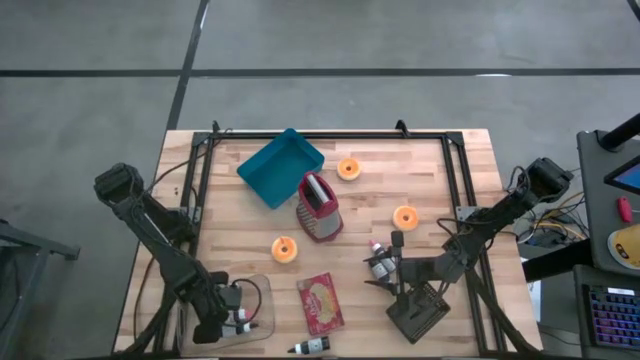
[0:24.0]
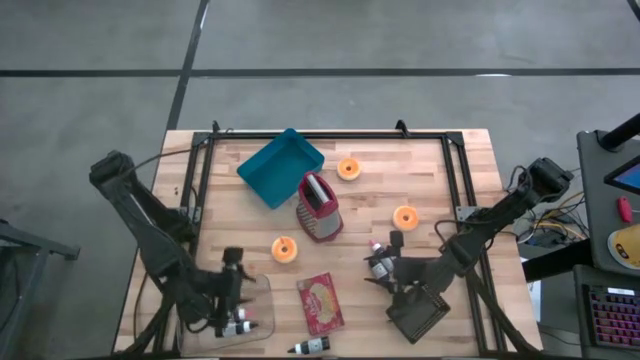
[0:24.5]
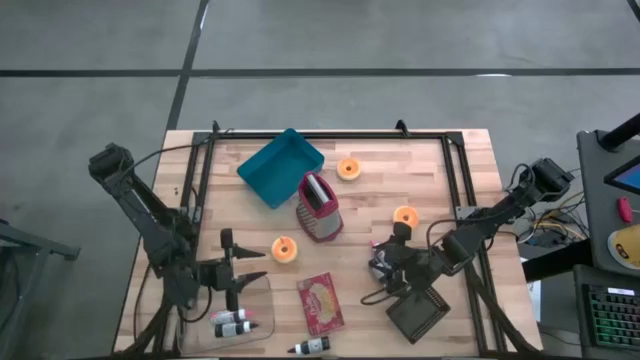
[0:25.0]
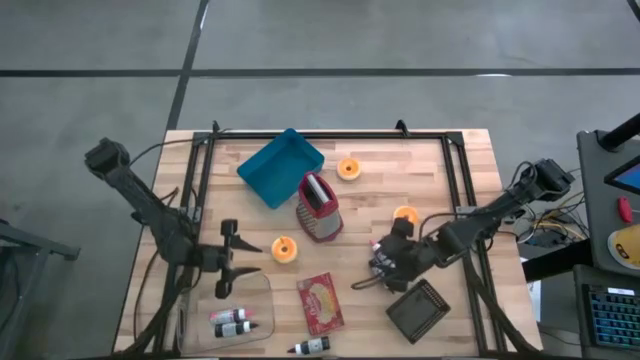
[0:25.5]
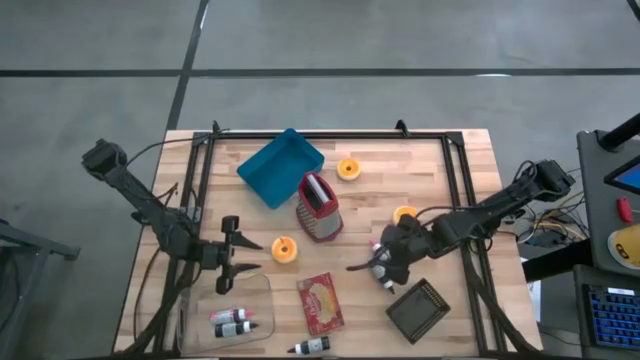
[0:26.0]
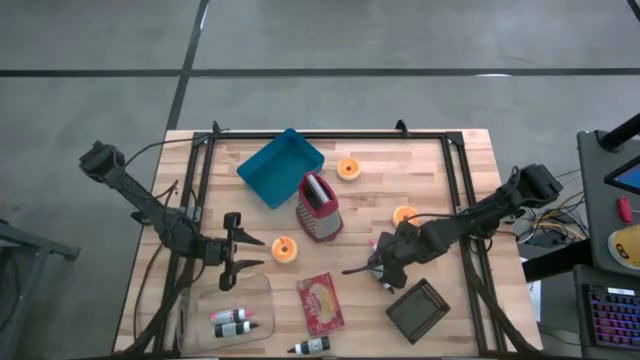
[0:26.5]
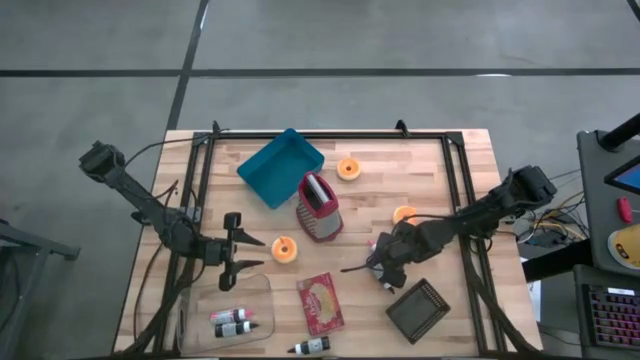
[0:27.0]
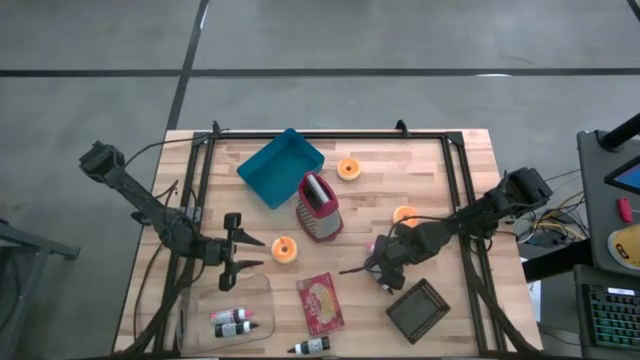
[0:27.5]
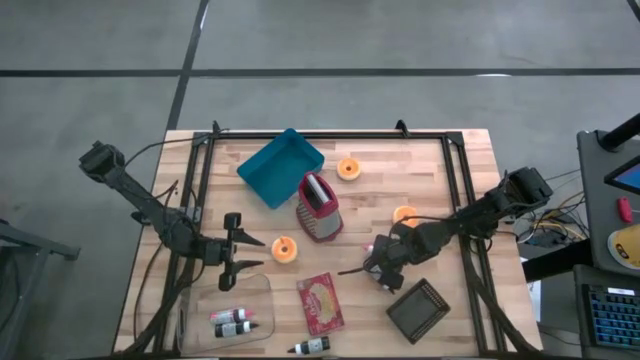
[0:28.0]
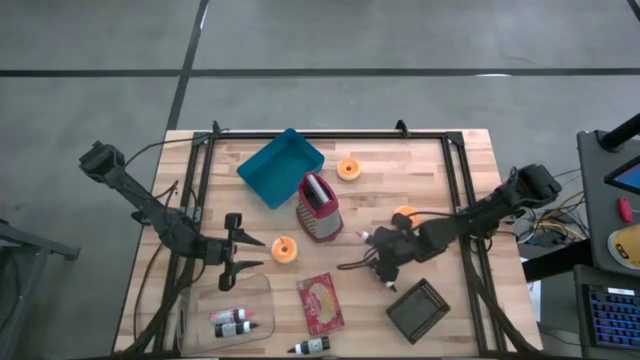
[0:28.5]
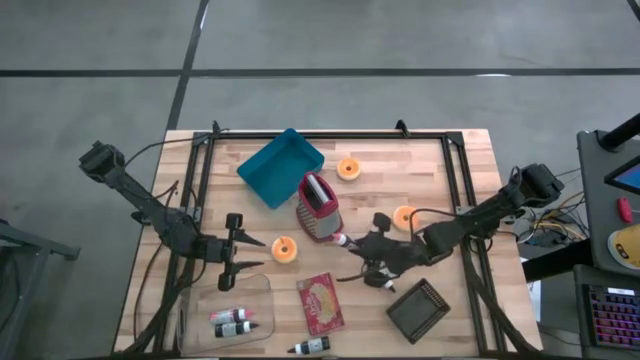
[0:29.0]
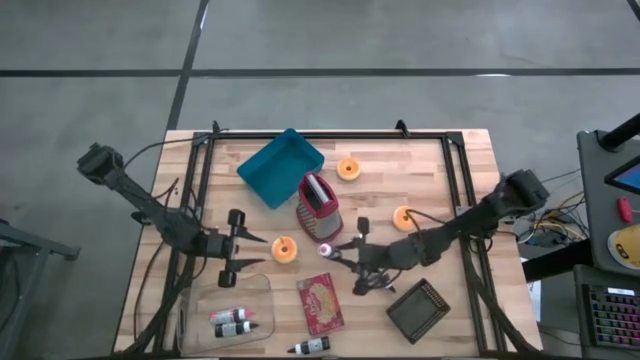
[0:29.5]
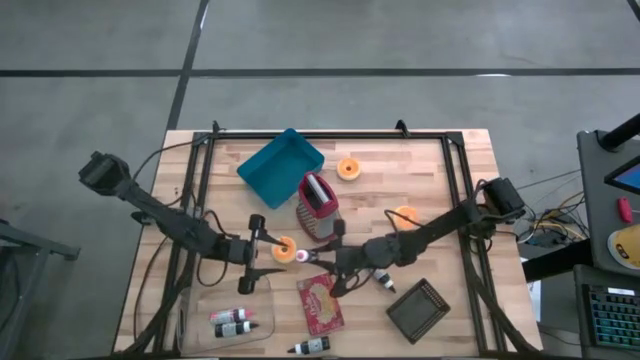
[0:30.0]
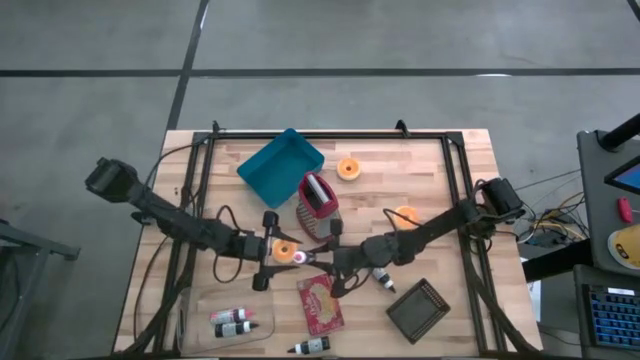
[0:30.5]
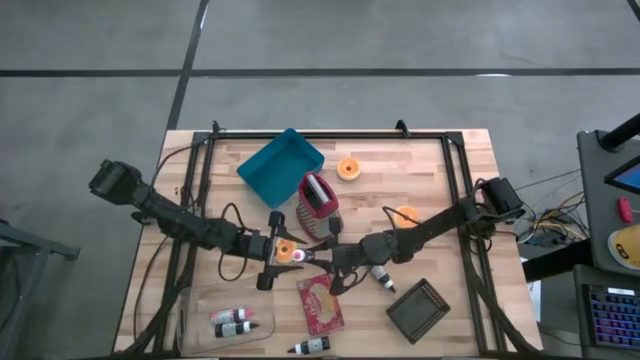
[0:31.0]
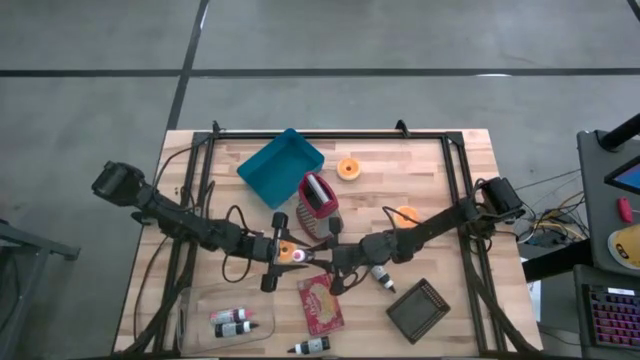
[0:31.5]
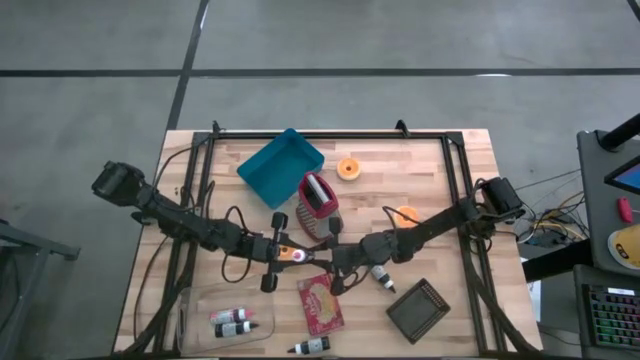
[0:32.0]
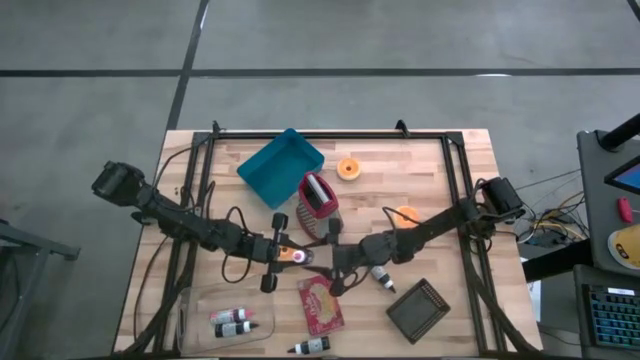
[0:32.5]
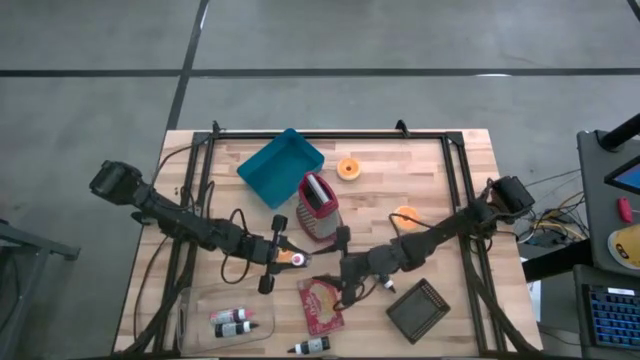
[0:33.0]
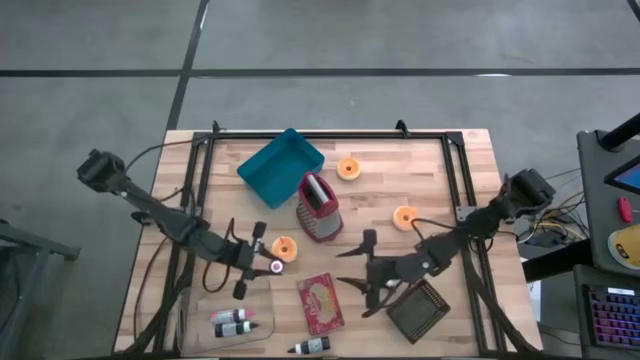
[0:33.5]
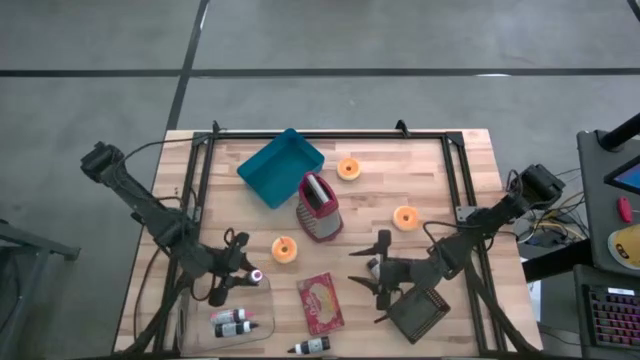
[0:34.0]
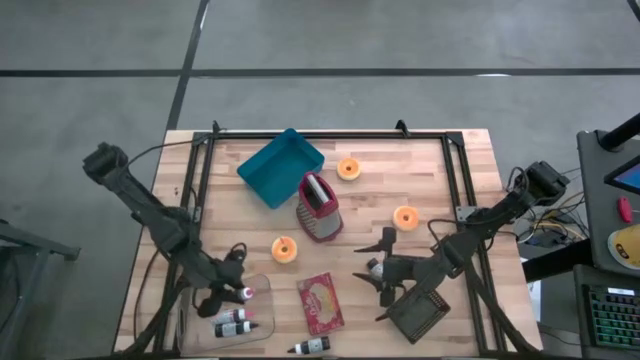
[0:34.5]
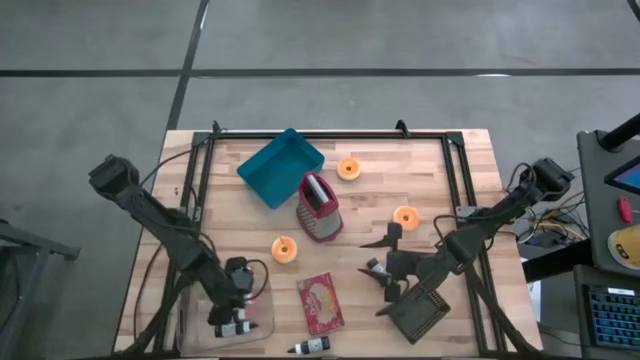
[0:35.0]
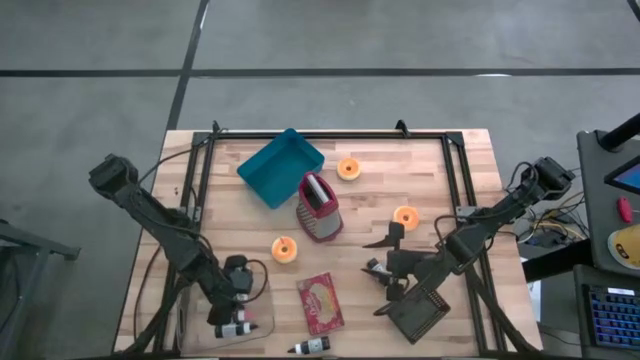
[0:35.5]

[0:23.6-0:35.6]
Put the pink food coloring into the transparent bin

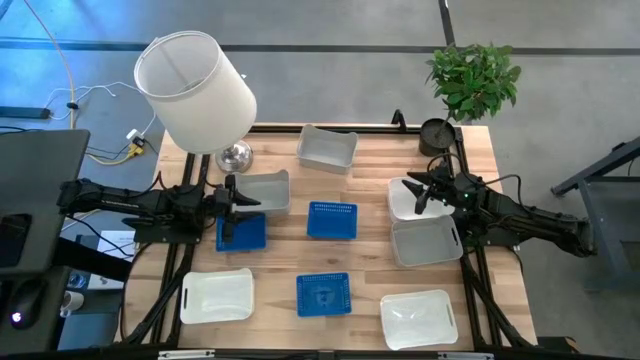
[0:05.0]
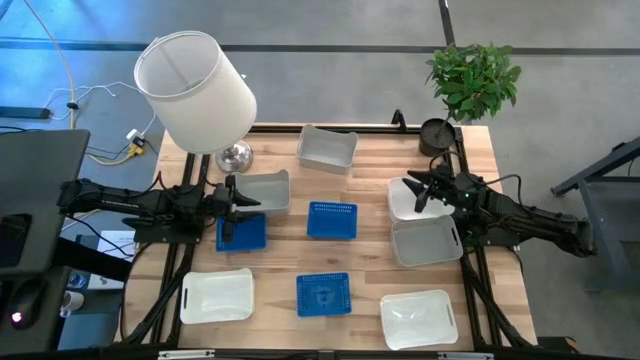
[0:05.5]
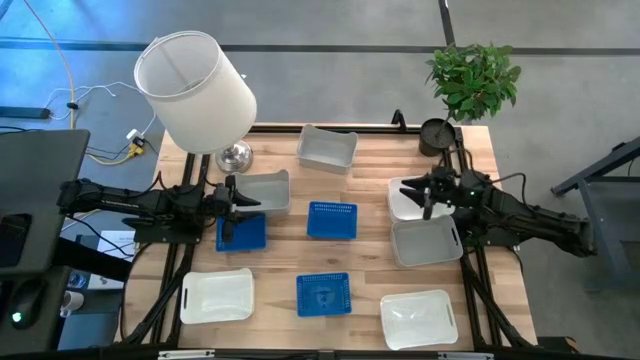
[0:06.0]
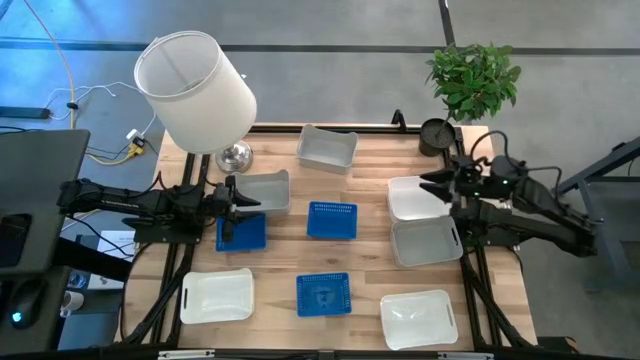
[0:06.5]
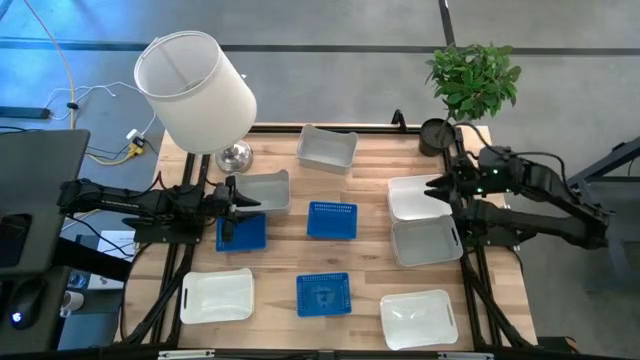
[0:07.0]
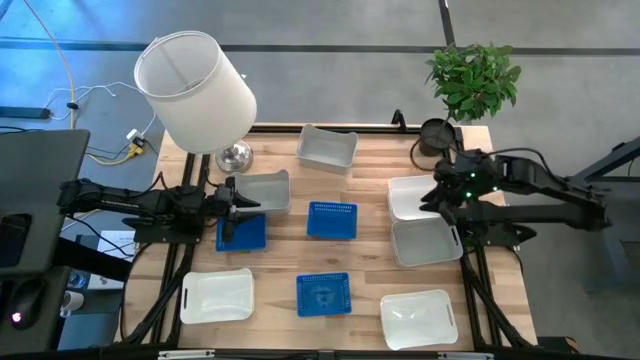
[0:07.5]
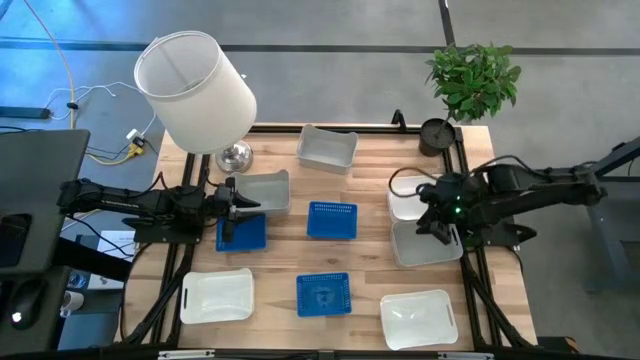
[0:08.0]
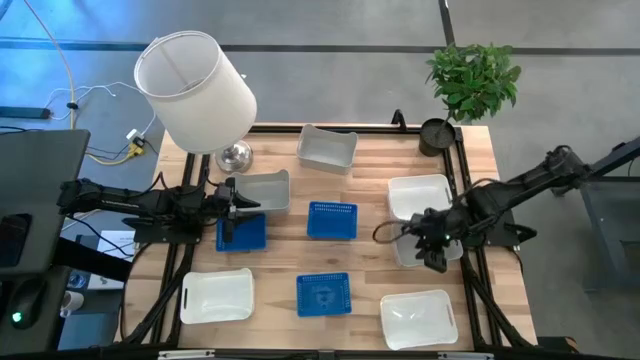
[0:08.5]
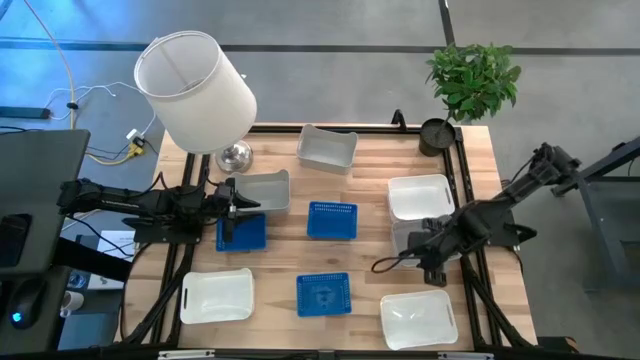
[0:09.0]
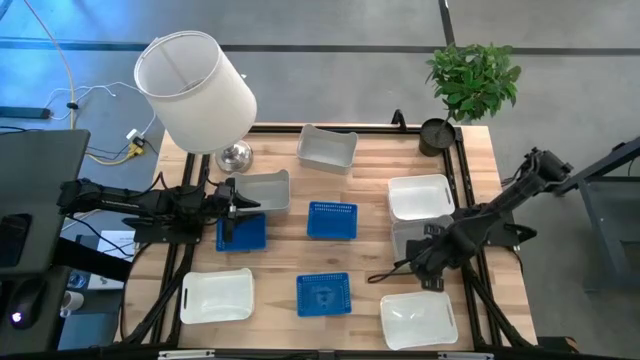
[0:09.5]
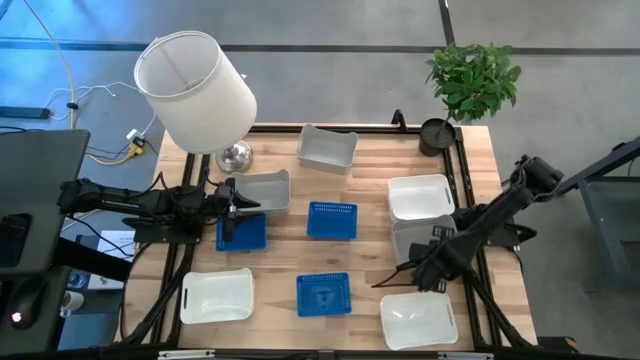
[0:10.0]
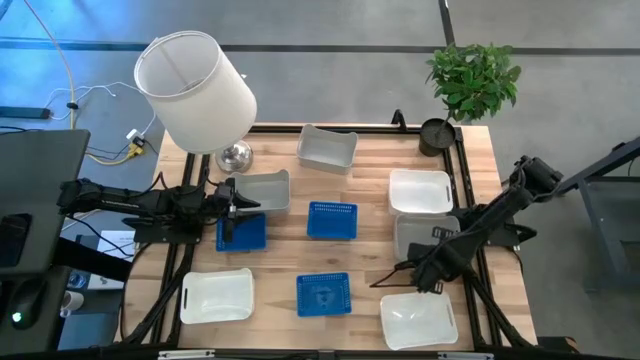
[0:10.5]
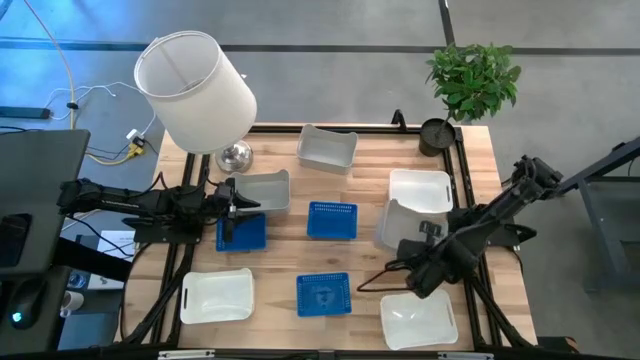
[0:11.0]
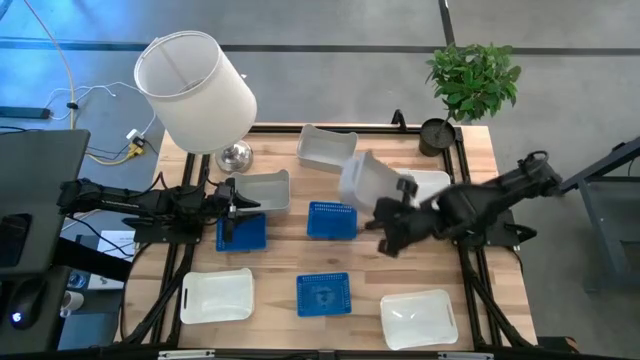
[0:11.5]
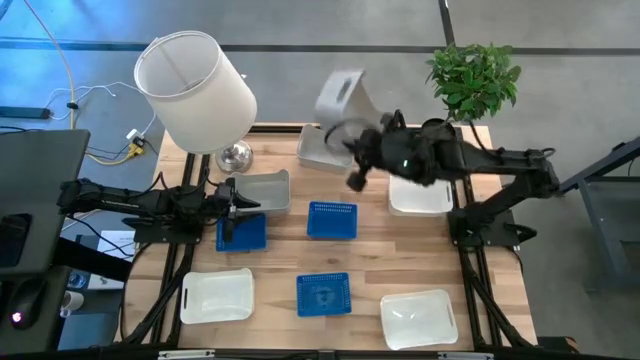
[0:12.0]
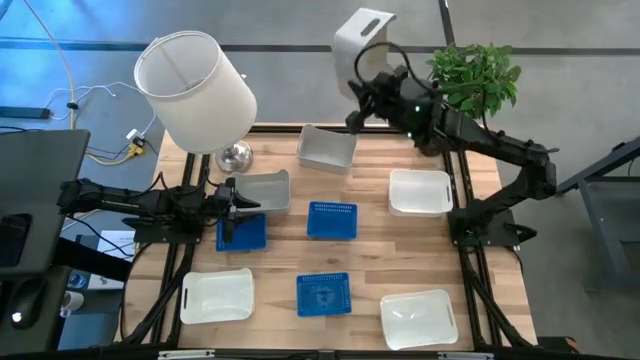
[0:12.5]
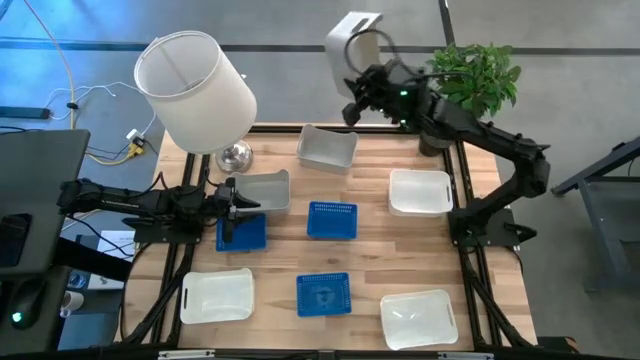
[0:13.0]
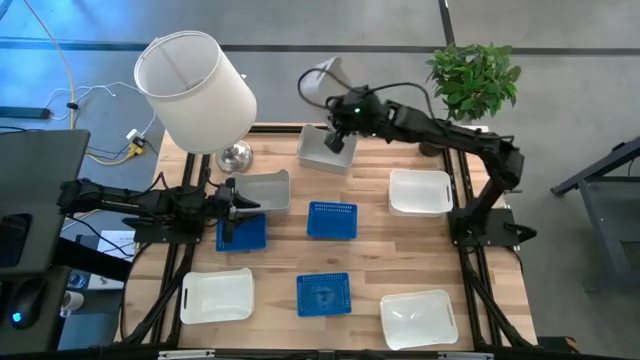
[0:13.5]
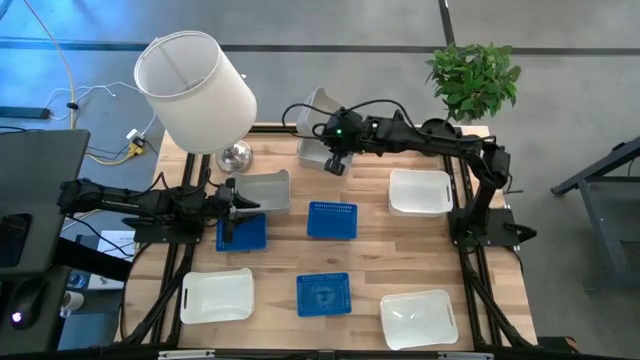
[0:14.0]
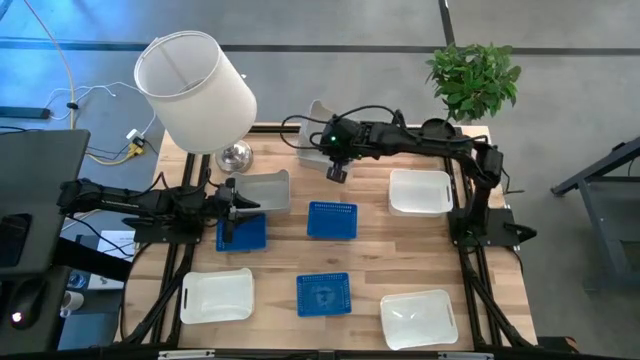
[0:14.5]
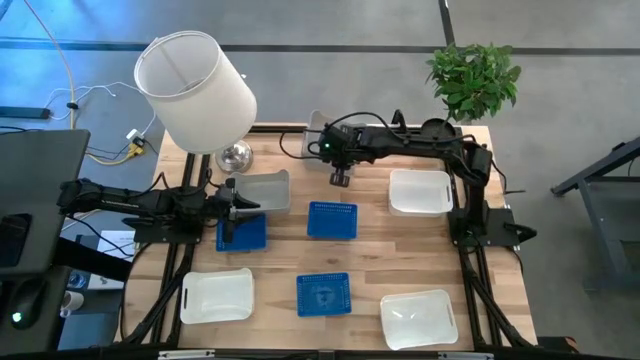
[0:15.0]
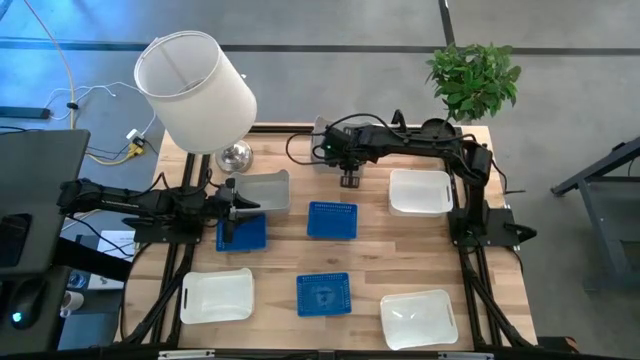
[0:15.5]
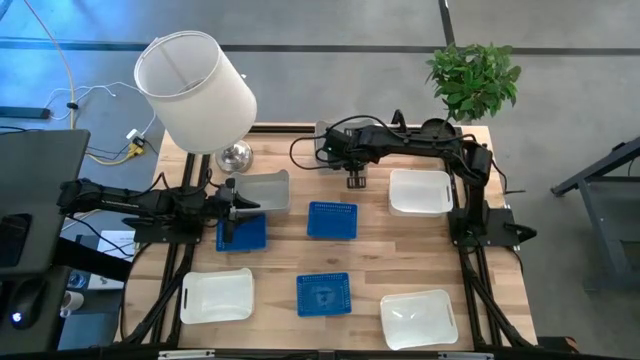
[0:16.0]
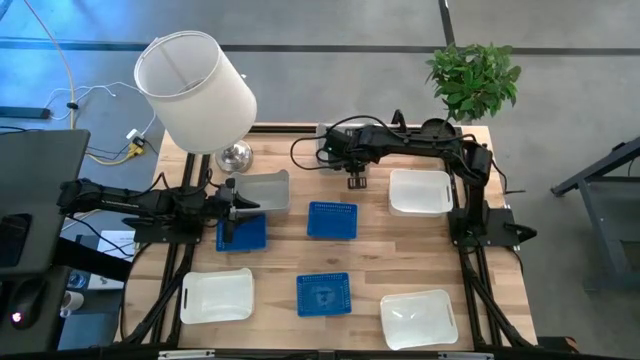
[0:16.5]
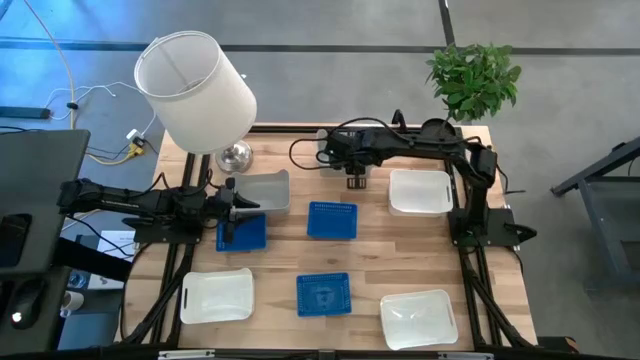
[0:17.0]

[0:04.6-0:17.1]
Stack the bottom gray bin on top of the top gray bin
